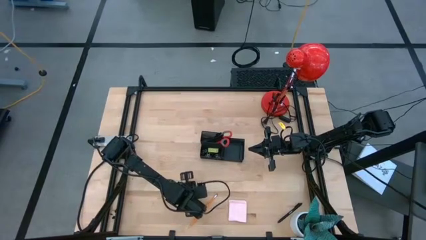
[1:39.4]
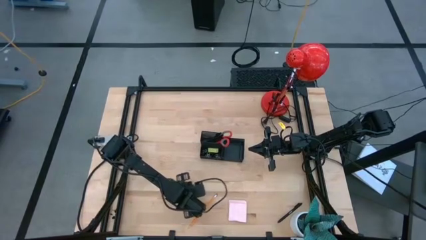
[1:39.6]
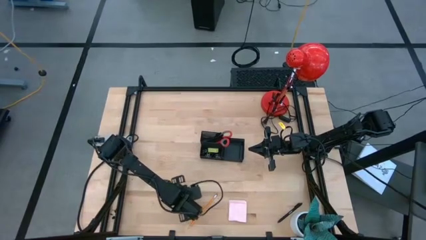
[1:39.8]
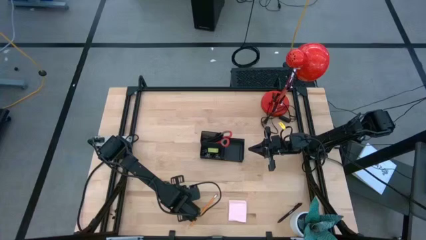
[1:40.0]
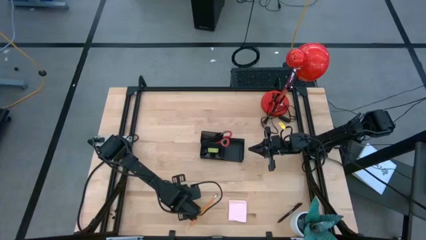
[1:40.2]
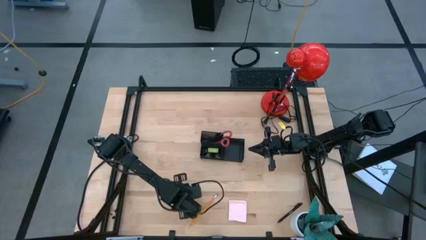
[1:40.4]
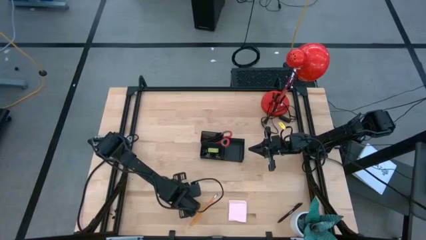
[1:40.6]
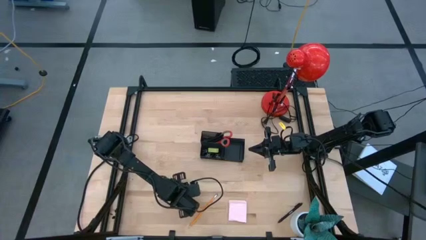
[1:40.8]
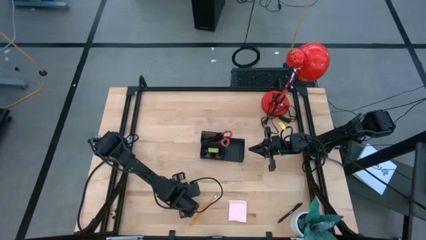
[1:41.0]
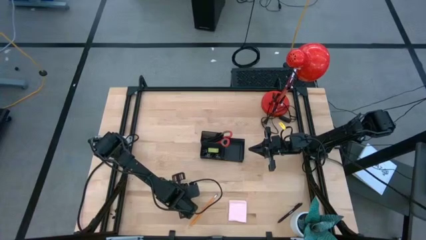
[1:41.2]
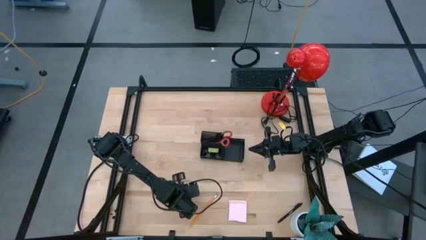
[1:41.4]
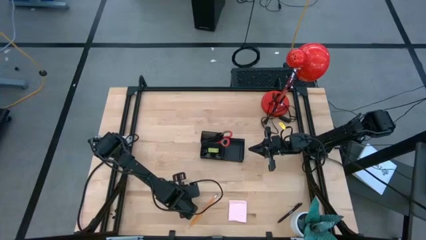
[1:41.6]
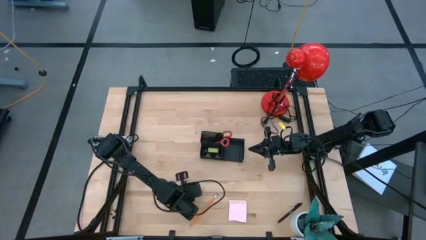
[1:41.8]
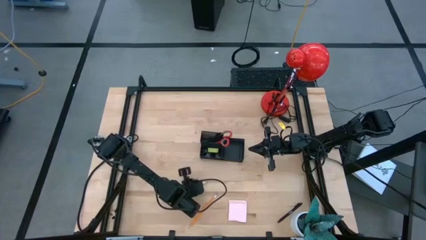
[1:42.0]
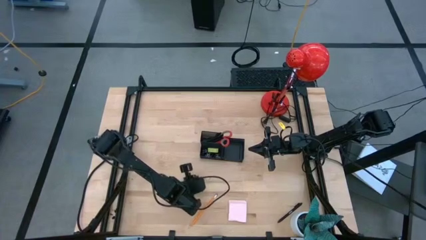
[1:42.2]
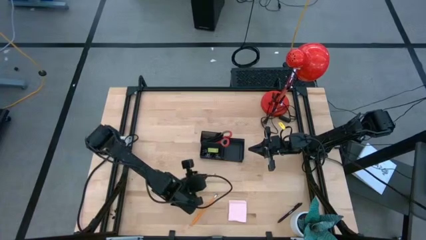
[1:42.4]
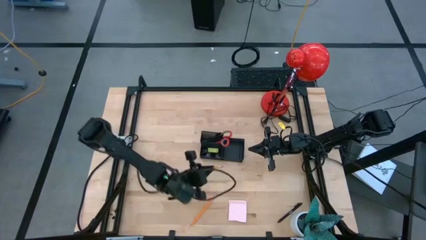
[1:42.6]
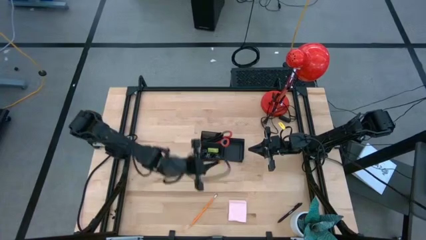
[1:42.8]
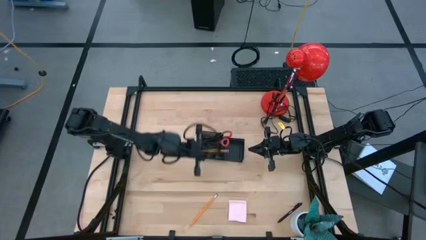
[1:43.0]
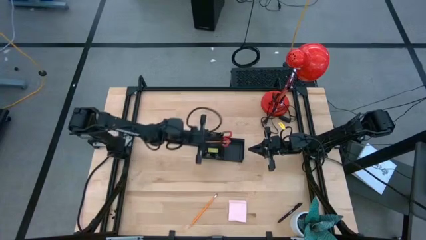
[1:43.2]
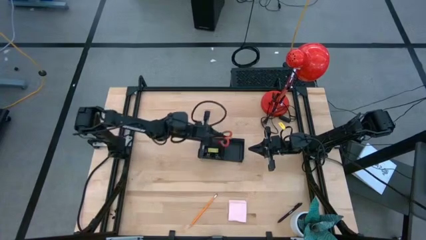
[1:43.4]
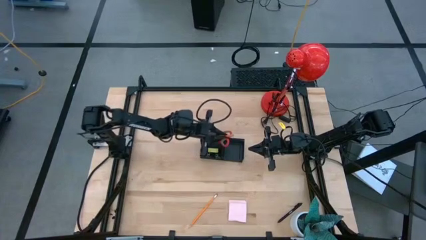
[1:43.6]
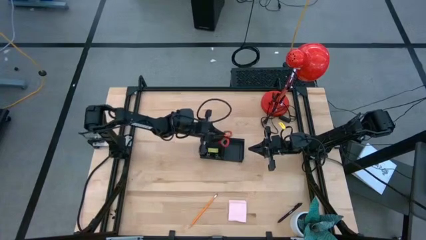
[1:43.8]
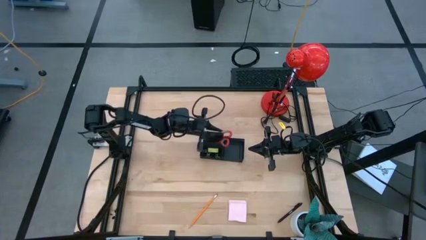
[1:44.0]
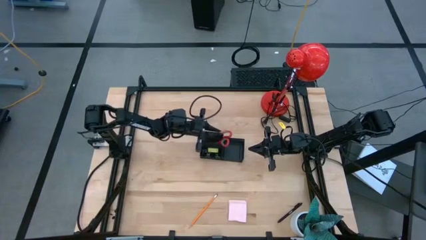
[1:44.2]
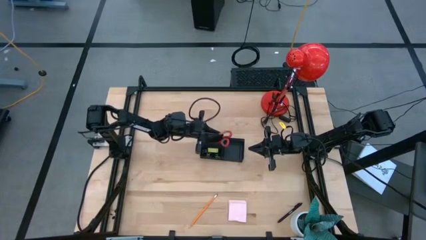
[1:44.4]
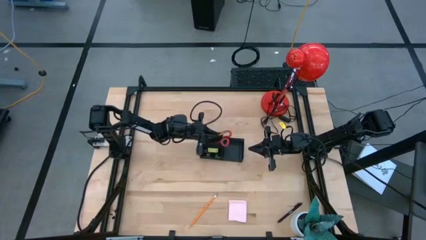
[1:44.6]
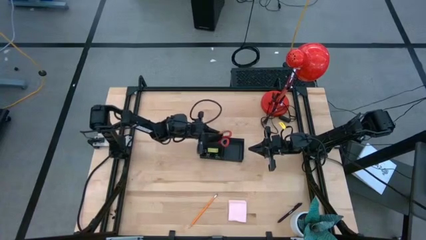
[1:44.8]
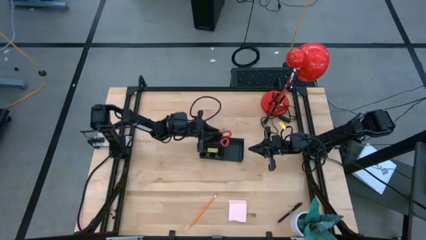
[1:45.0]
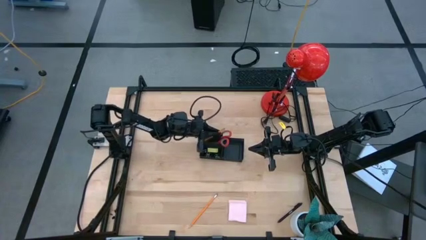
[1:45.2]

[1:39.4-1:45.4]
Task: Pick and place office supplies into organizer
Put the yellow pencil into the black desk organizer

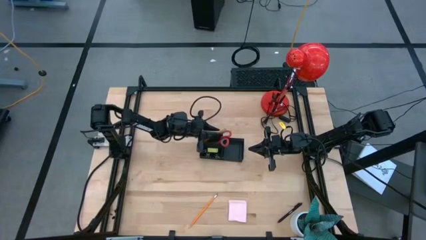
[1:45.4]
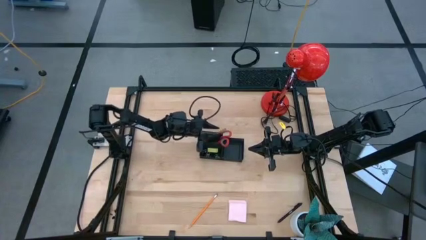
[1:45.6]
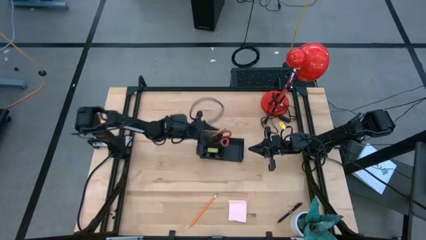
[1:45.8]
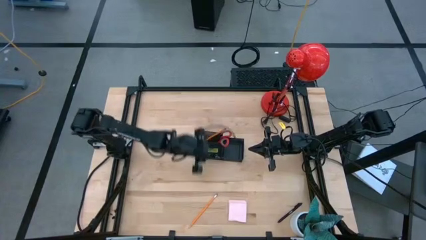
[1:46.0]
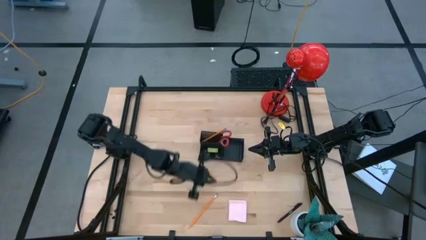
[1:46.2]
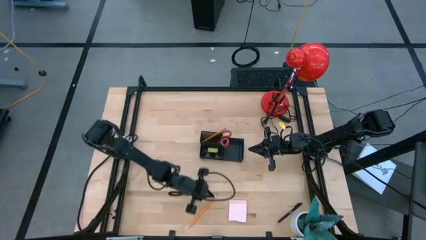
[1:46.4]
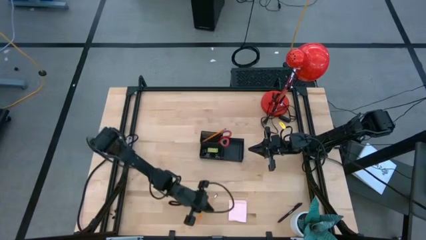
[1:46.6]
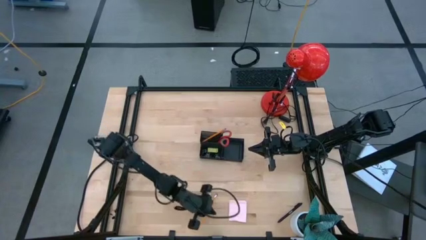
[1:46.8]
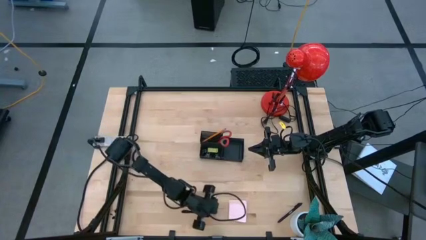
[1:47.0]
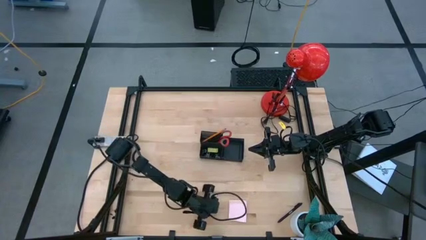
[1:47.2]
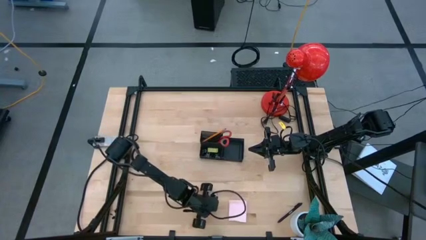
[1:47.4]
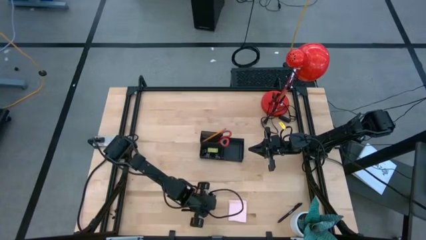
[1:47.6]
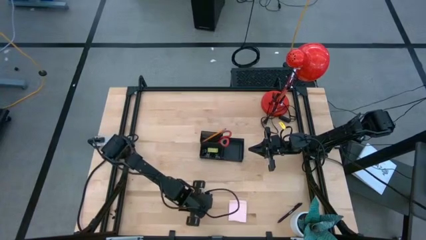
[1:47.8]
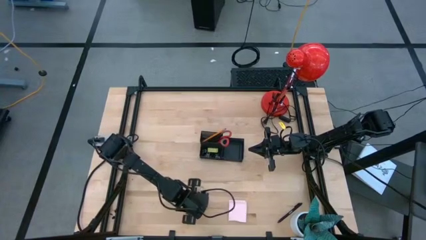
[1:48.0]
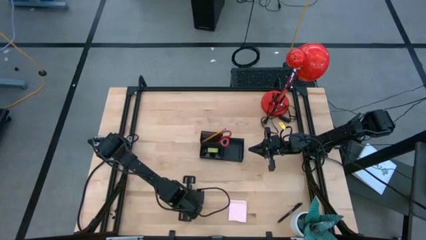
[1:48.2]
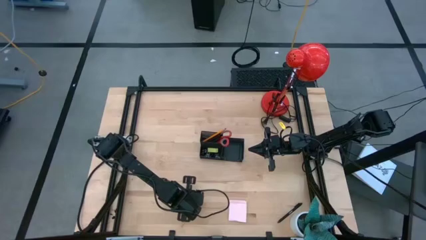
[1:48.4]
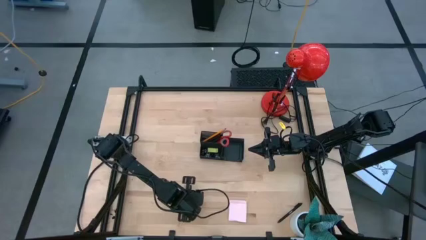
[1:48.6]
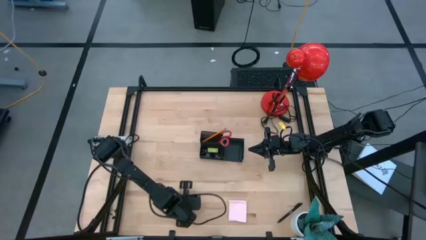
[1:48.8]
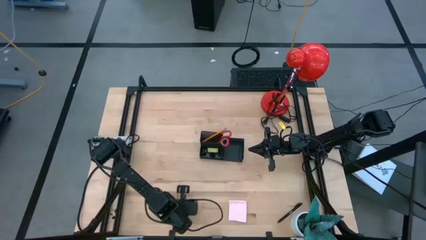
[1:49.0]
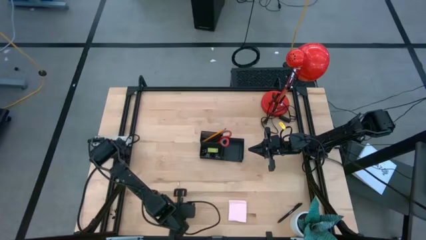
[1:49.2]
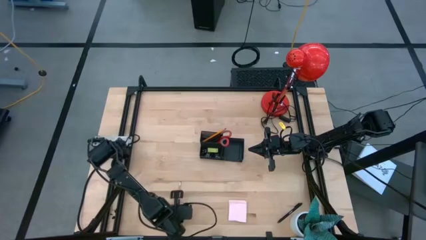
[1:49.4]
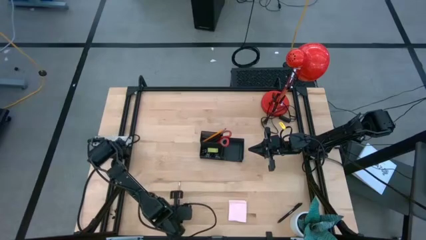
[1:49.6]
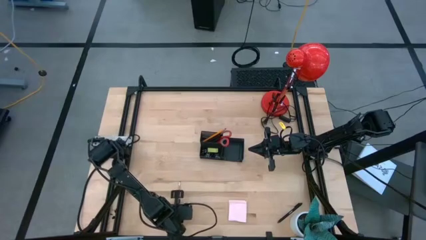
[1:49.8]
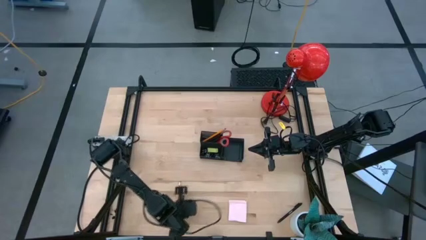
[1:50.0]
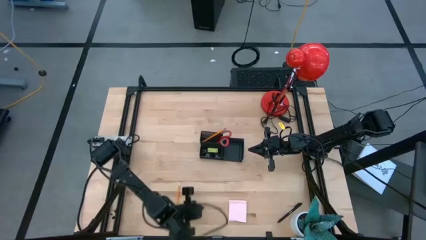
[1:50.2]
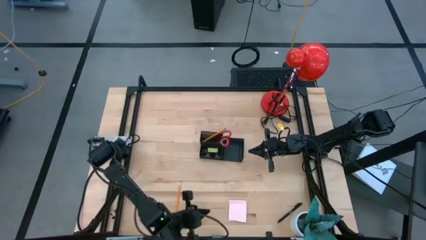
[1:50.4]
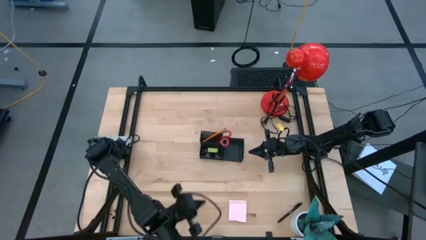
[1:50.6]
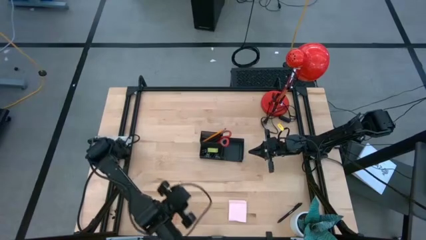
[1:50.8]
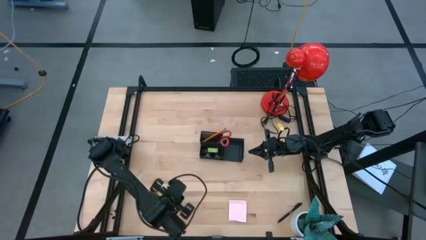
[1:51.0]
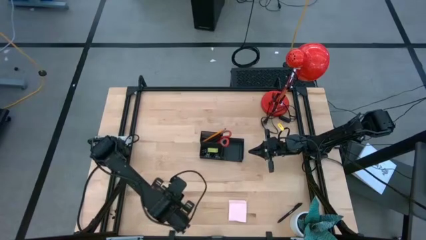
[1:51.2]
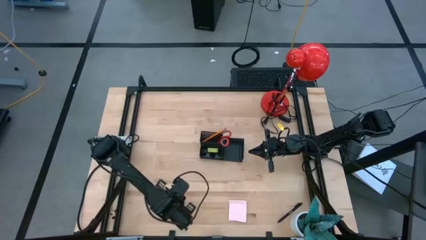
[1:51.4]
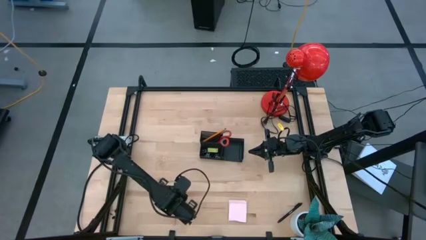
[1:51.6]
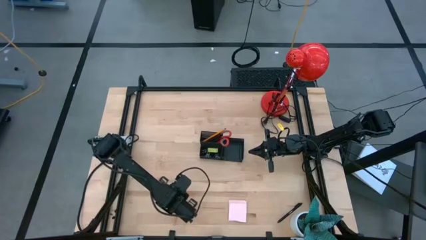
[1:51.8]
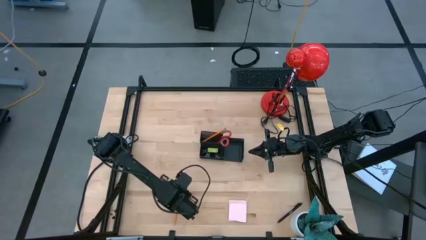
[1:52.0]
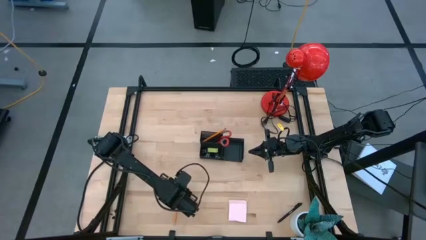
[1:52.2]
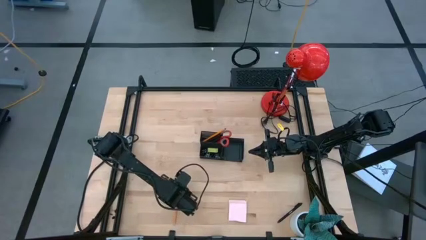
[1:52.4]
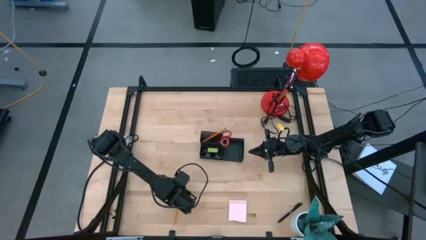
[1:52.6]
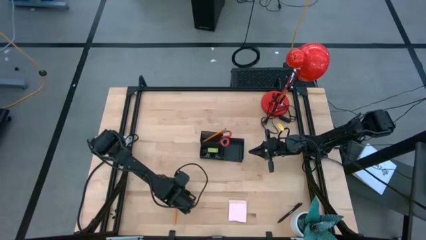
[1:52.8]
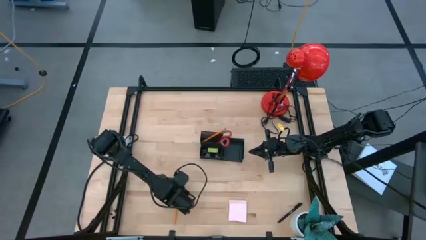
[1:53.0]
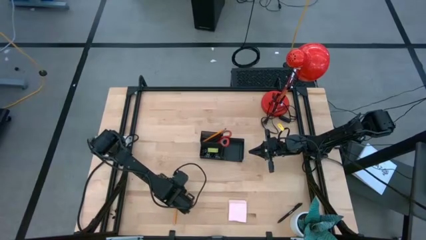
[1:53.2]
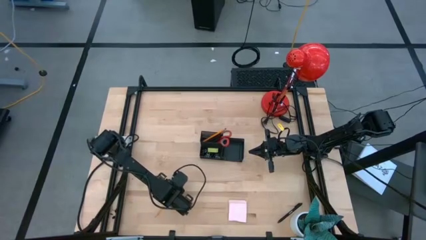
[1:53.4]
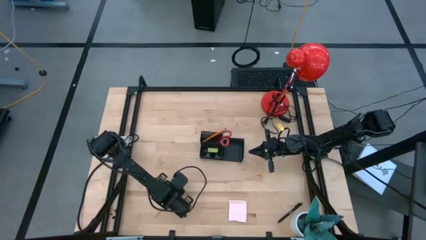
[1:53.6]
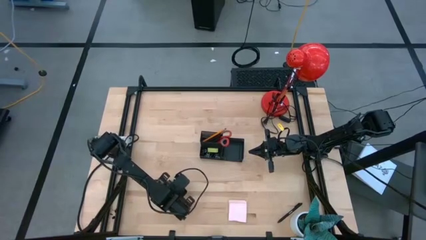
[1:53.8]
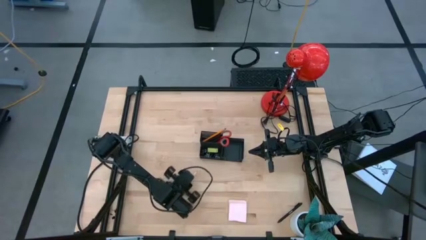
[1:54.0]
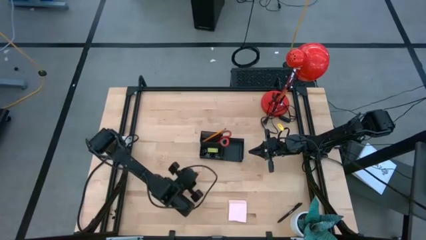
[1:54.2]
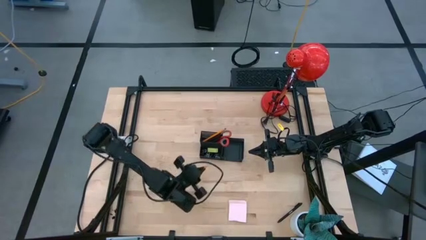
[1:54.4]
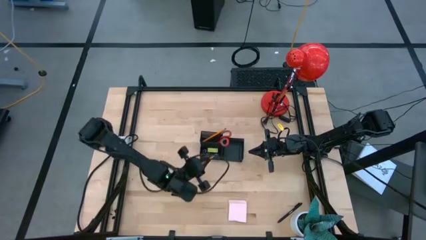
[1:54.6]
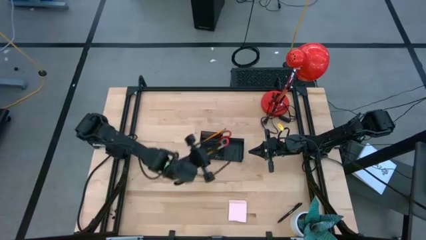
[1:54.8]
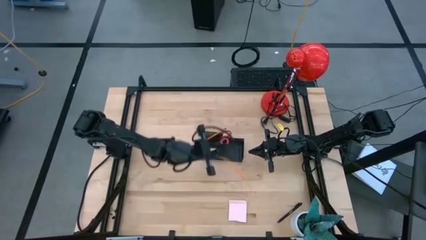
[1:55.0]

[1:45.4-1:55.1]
Put the yellow pencil into the black desk organizer
